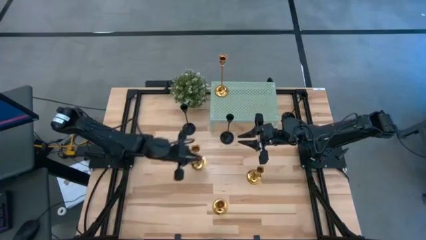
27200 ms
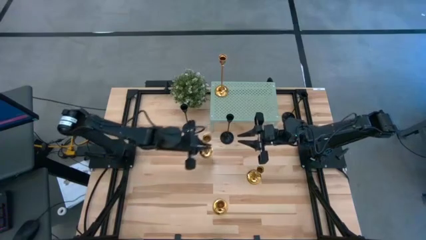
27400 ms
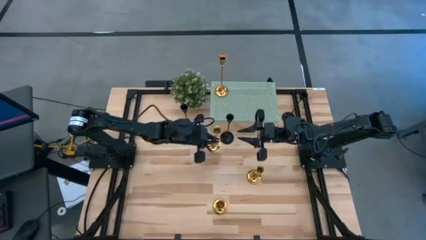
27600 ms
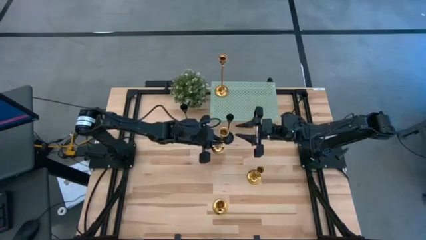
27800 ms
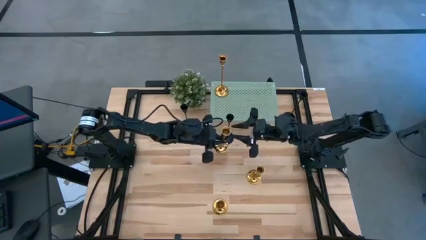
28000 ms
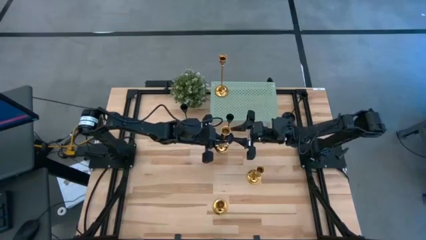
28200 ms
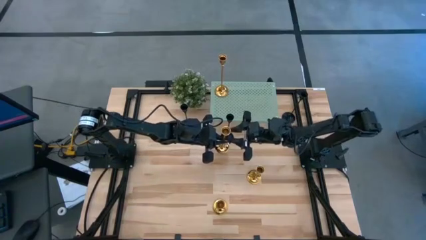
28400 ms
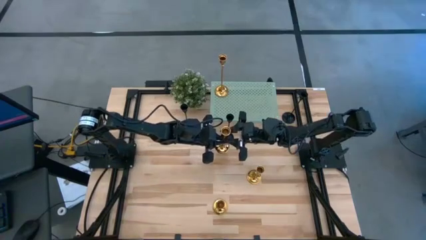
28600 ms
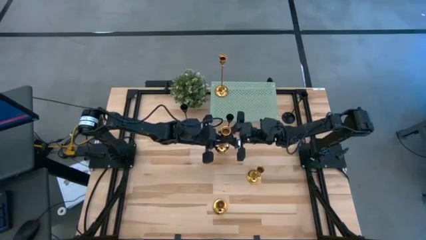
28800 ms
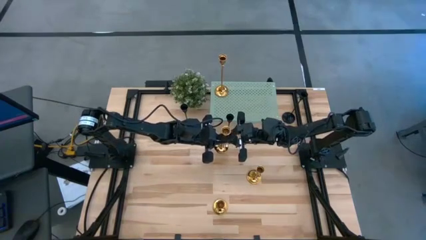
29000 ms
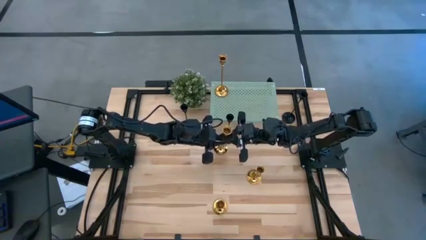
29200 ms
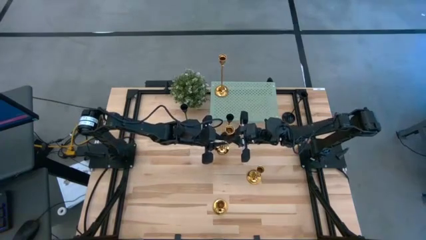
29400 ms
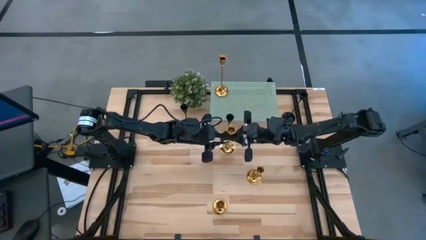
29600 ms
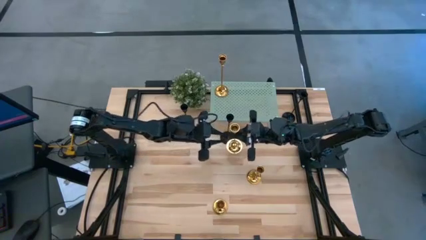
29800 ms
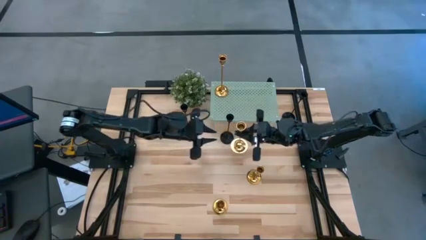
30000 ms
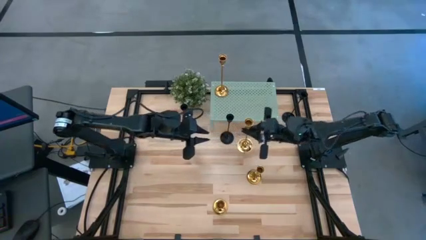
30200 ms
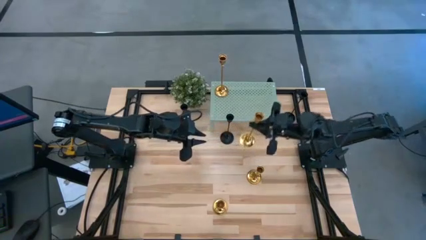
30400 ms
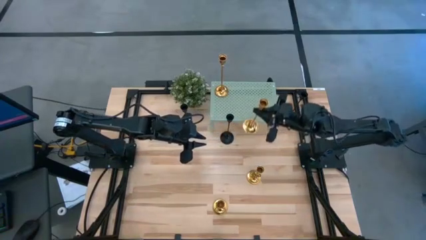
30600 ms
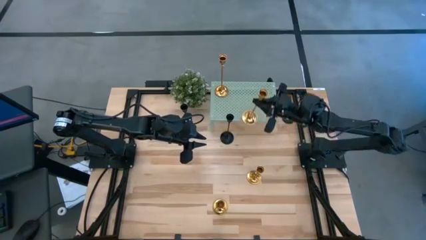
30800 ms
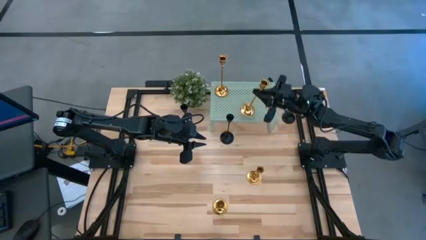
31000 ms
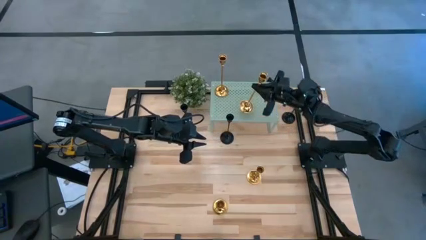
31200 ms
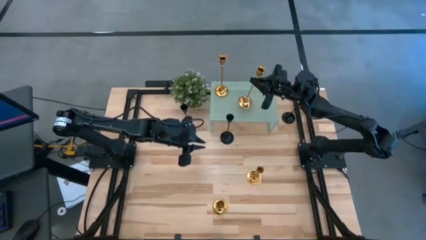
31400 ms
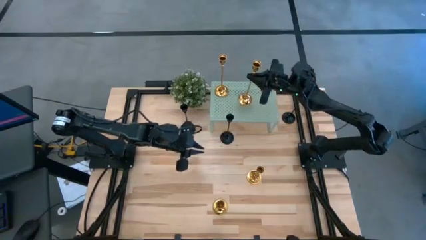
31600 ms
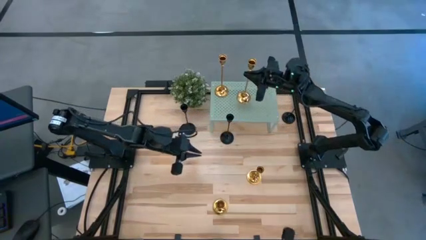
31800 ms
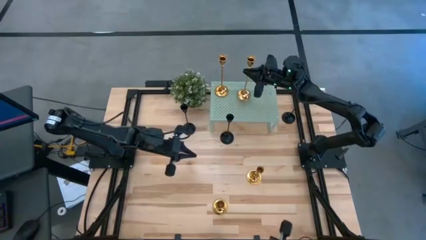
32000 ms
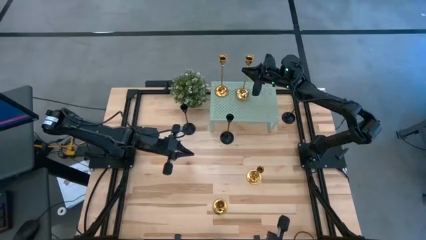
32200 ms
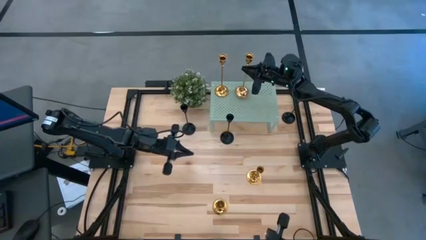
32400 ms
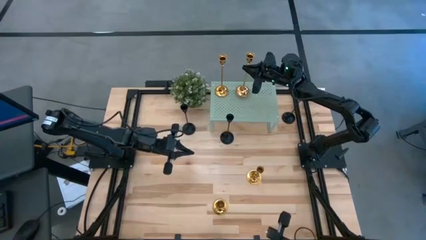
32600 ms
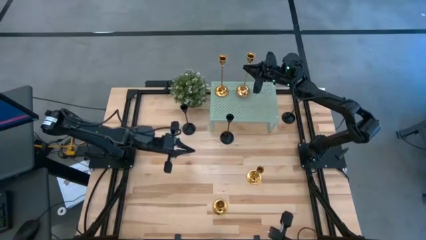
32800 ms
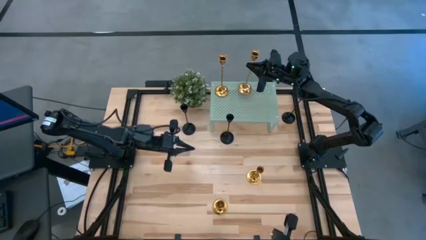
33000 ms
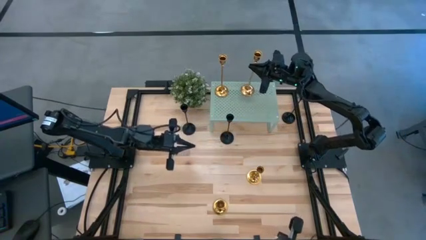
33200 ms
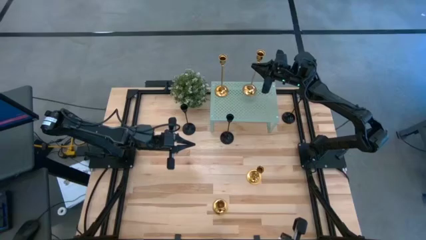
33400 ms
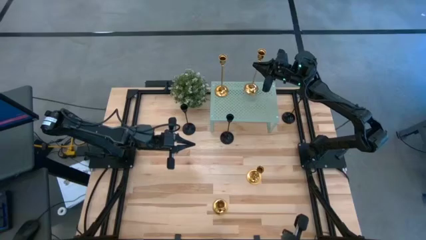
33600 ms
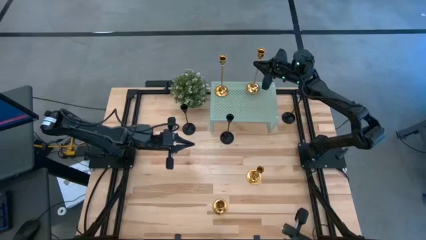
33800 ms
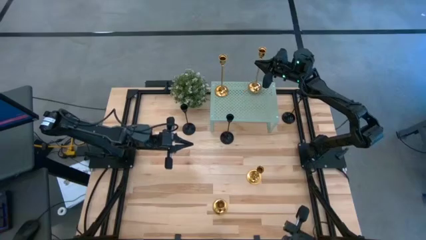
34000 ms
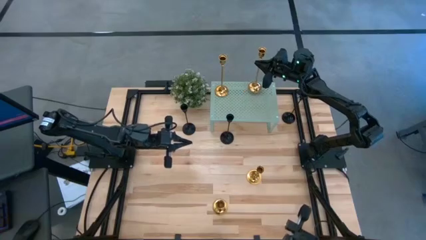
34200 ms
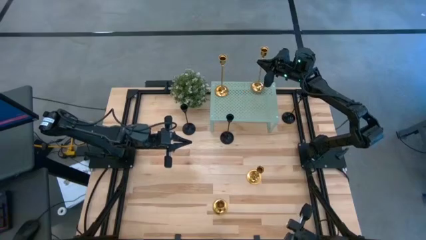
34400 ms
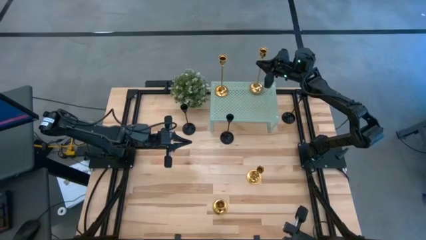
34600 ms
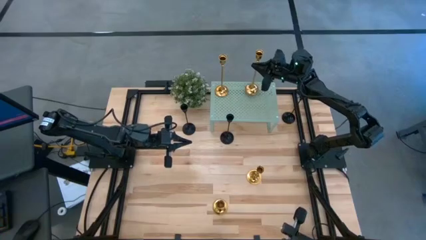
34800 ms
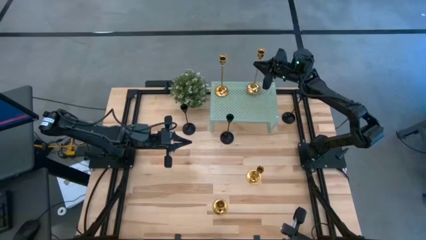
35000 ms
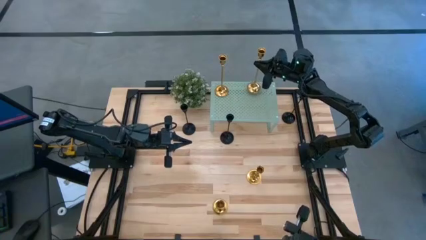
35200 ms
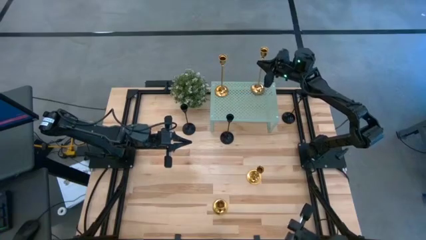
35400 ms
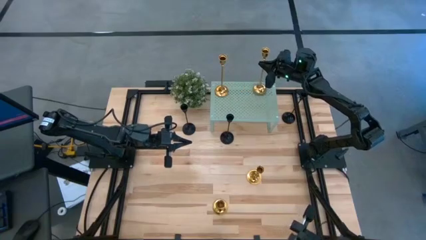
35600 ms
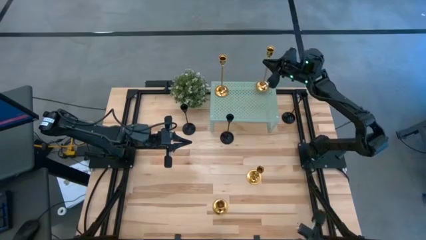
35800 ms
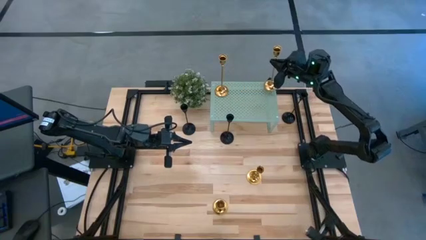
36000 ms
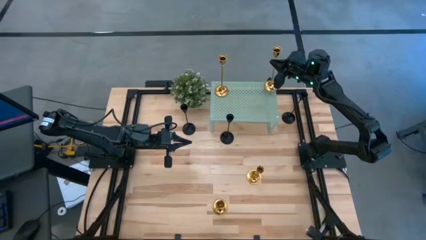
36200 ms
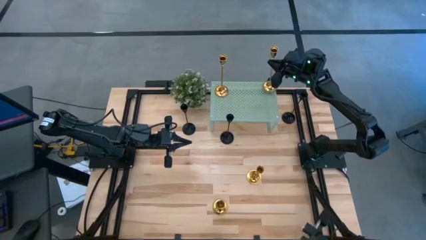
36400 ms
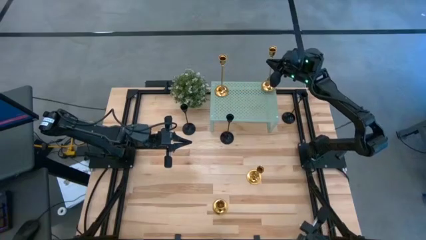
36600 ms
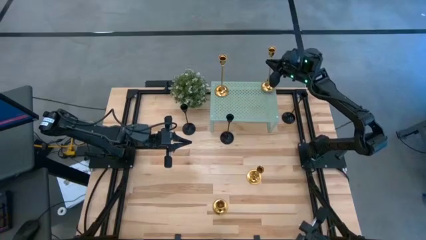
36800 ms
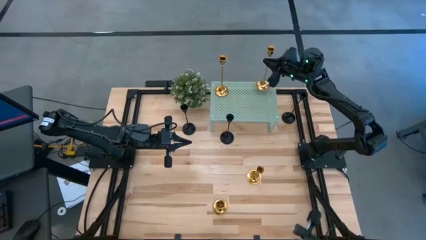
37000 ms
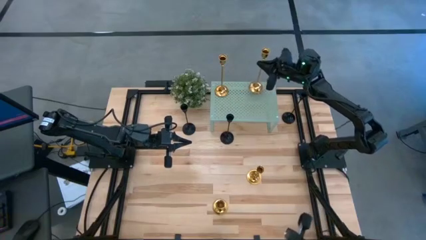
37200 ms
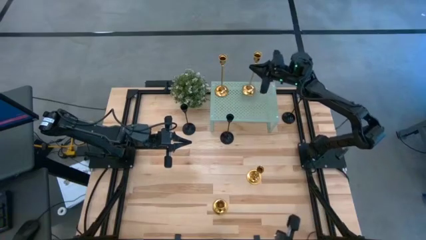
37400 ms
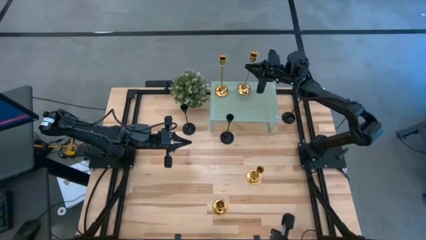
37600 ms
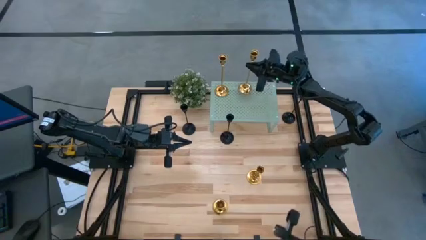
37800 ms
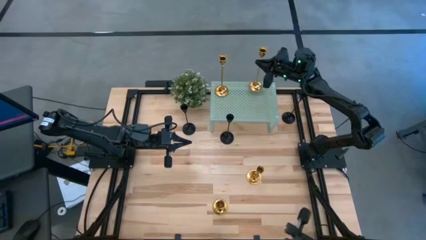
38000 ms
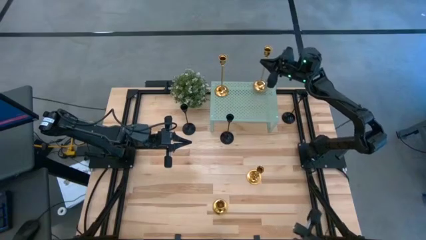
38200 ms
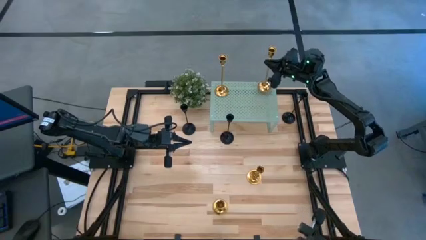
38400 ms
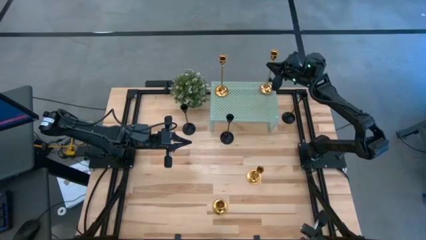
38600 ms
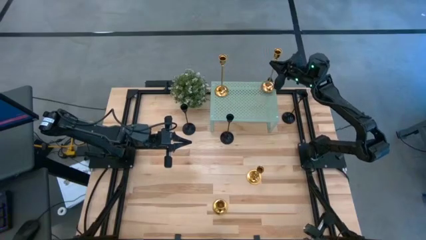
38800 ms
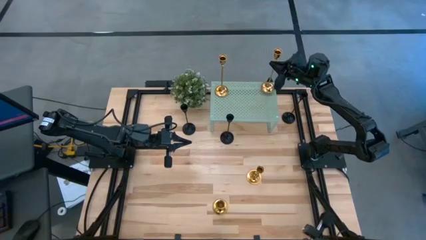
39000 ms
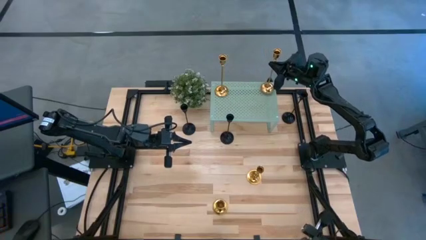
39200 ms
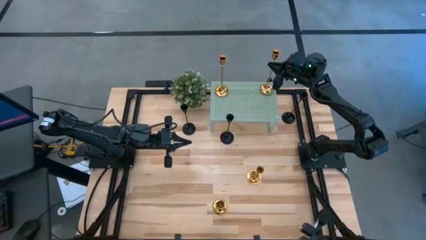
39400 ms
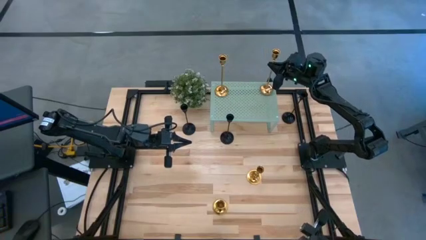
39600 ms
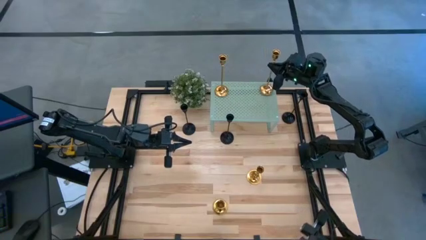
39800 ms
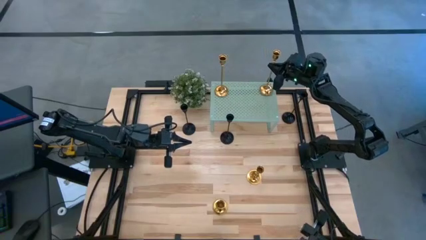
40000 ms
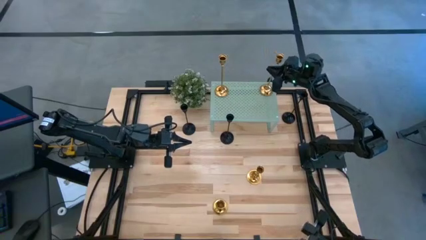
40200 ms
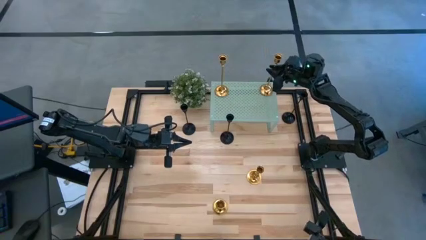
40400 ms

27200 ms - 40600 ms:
Task: Pick & Place candle stick holders
Put the gold candle holder on the shelf

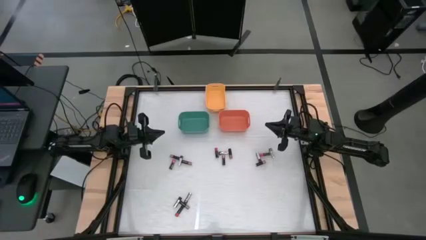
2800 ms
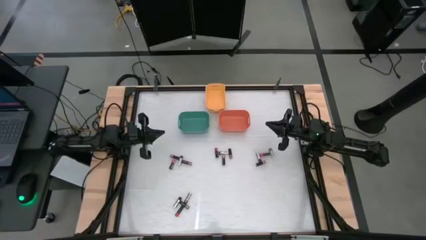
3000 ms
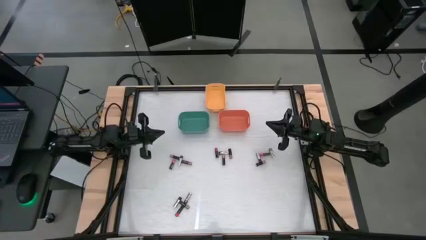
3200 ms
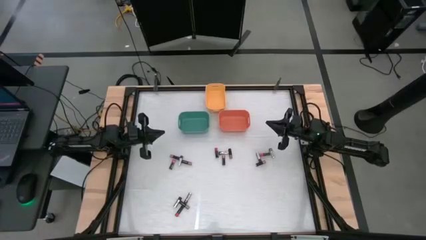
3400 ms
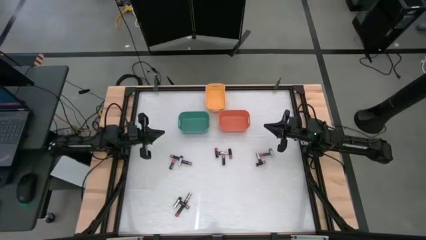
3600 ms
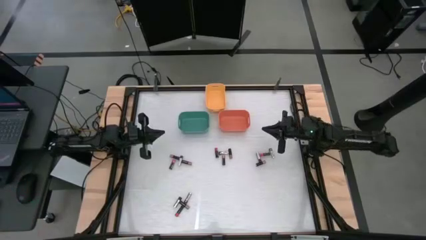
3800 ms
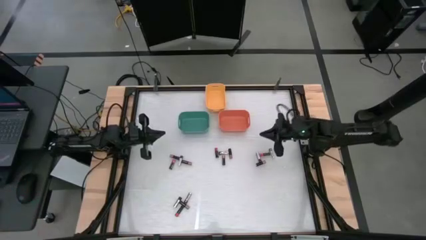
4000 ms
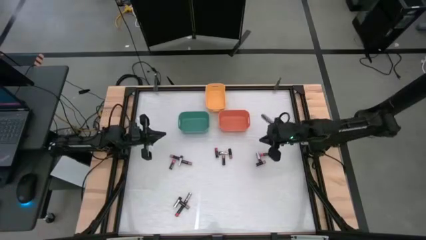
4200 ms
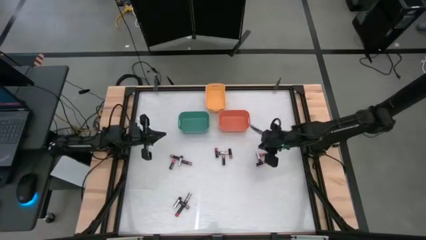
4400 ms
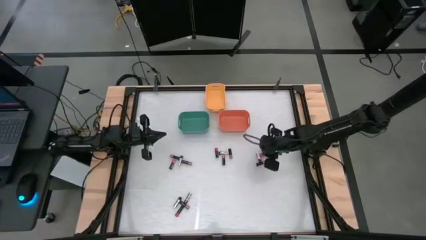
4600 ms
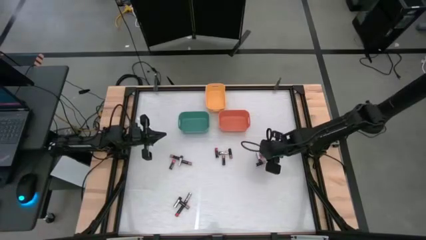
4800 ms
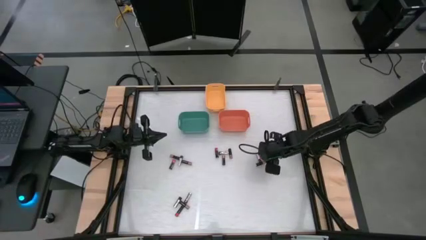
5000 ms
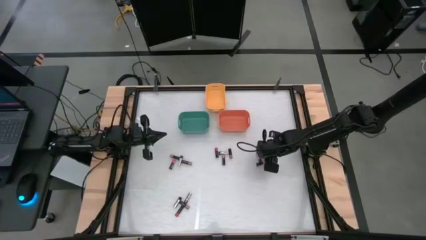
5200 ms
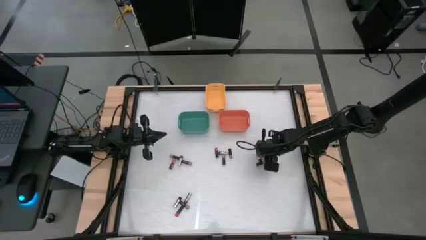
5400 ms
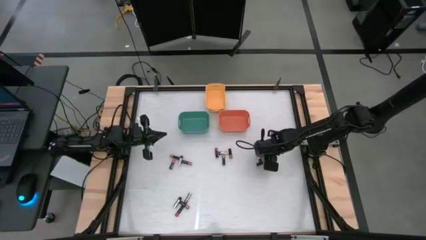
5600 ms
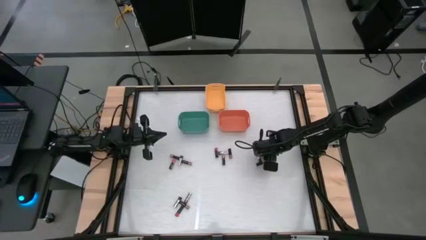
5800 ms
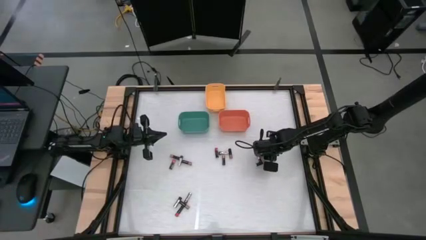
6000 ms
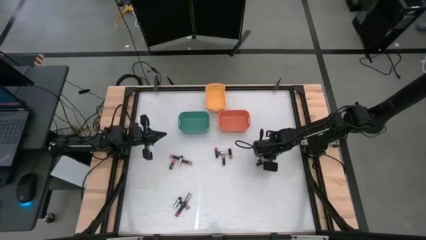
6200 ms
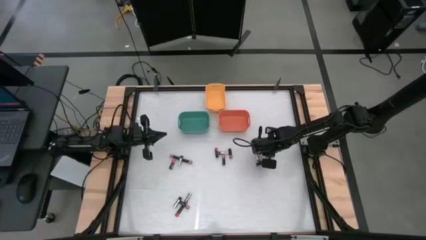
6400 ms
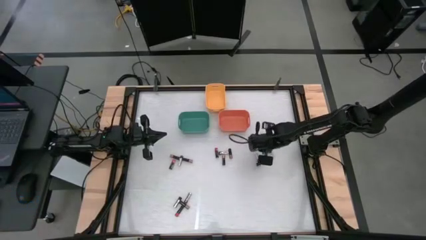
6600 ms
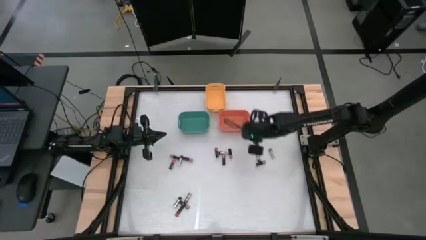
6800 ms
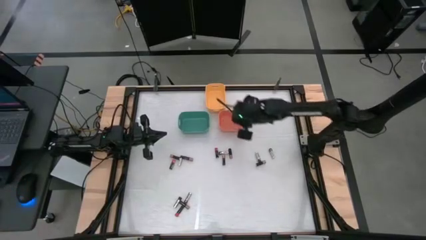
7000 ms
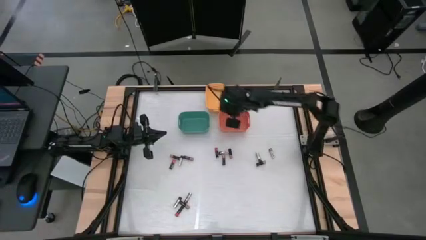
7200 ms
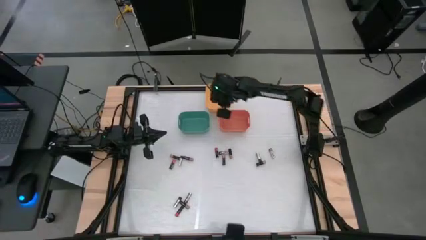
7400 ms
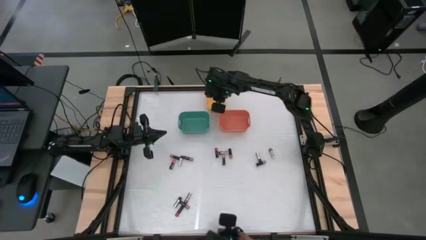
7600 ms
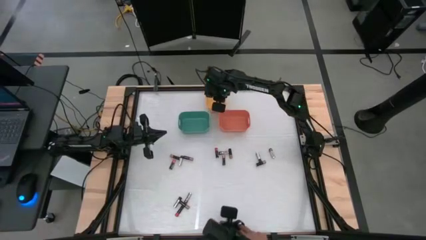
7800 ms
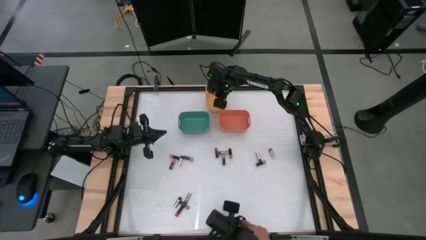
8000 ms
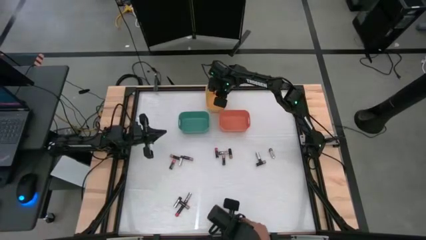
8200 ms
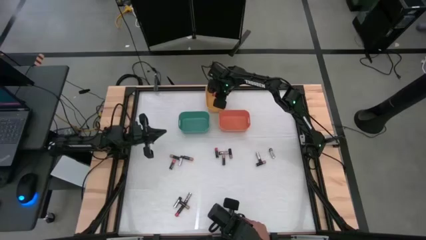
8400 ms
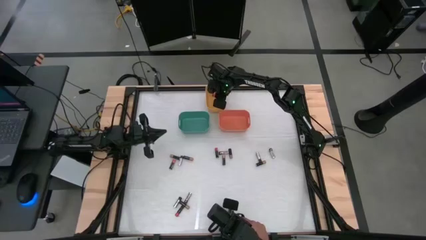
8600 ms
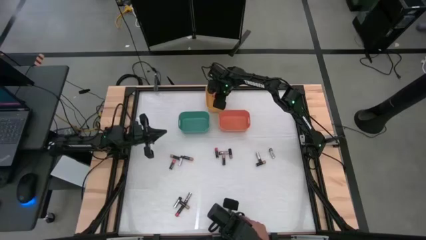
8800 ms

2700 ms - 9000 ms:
Task: Sort batteries
Put the red battery into the yellow bin
